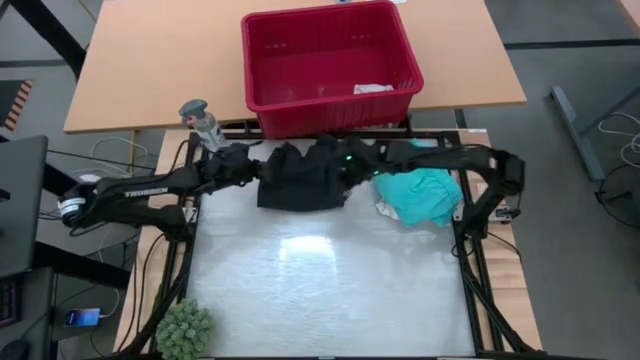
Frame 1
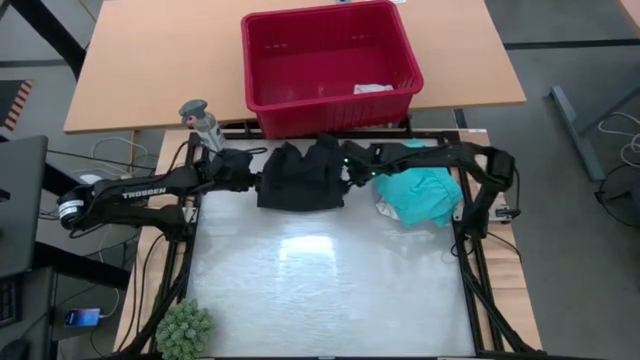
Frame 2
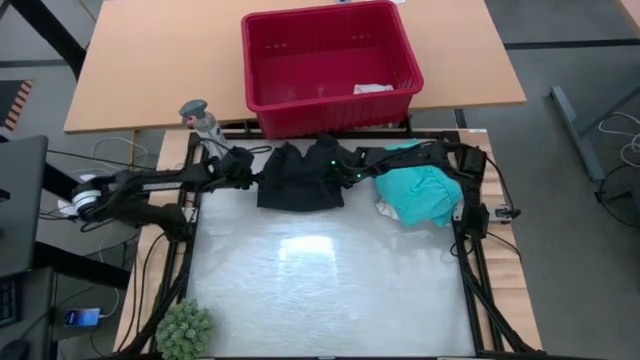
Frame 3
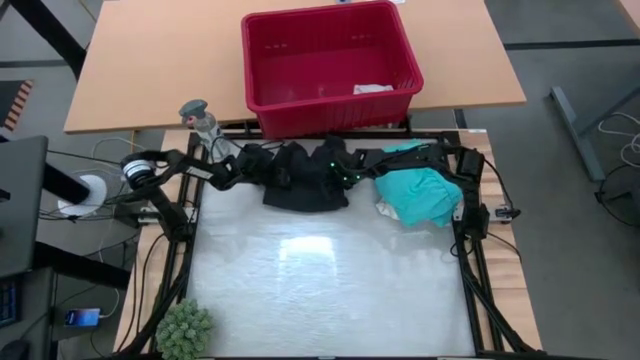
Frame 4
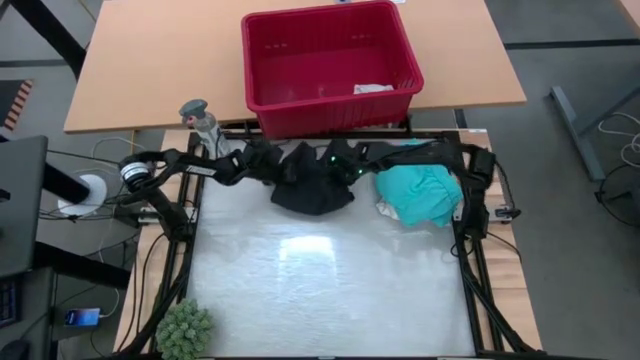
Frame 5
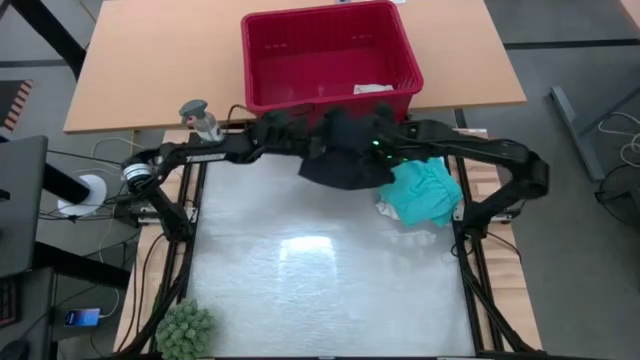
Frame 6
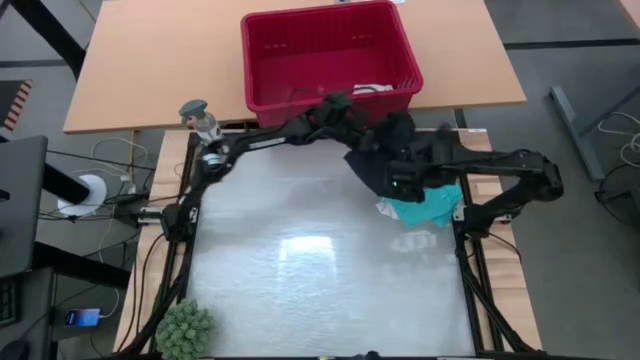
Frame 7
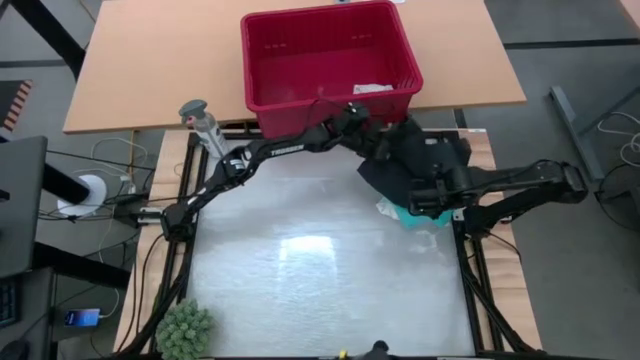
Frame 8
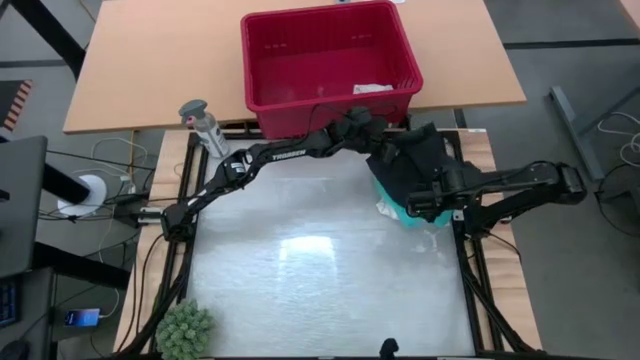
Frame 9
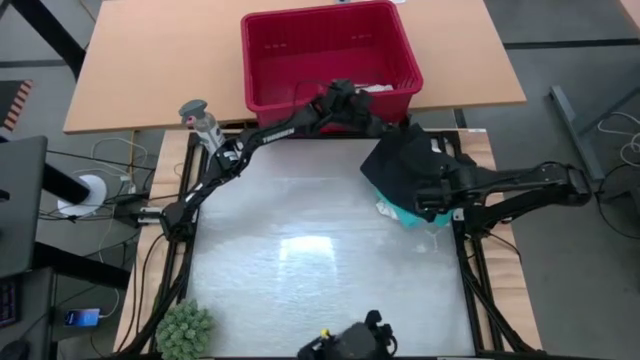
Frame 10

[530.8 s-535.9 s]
Task: Fold Laundry from Bin
Stack the black shorts on top of the light blue shorts
